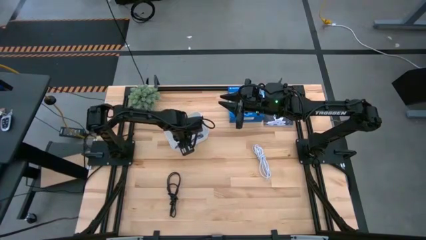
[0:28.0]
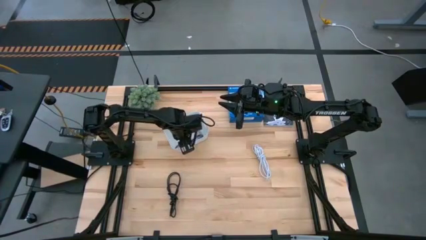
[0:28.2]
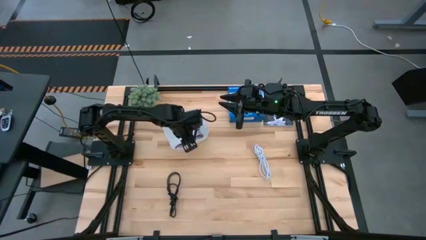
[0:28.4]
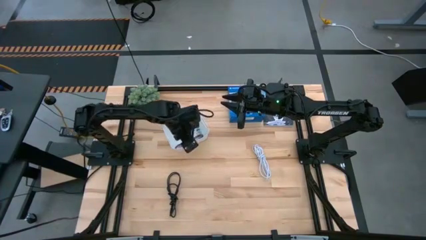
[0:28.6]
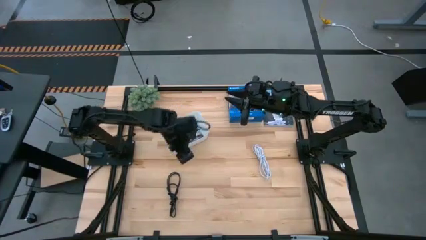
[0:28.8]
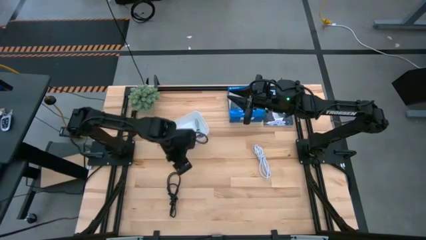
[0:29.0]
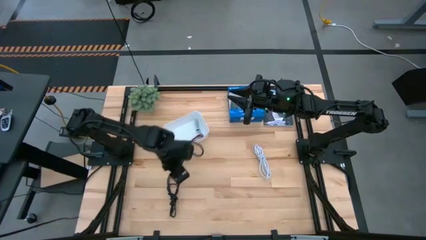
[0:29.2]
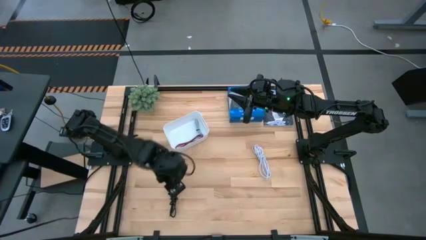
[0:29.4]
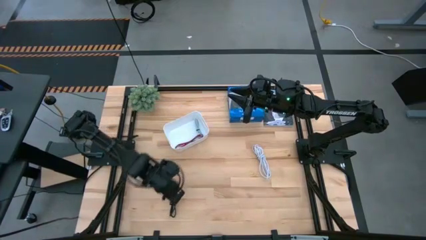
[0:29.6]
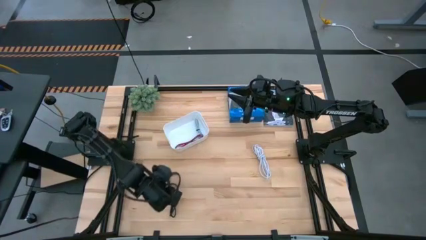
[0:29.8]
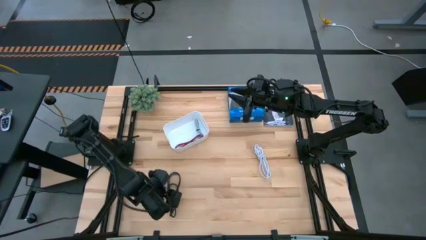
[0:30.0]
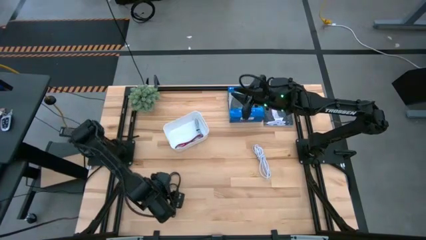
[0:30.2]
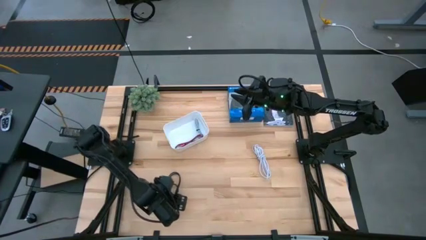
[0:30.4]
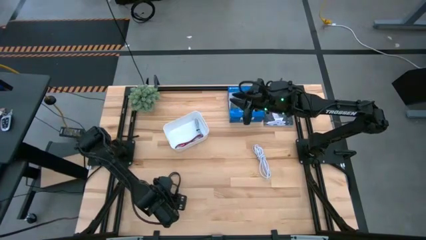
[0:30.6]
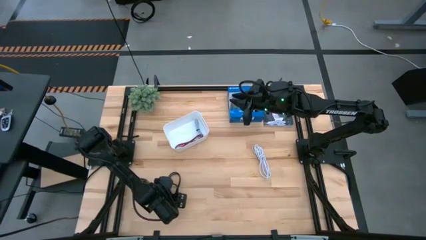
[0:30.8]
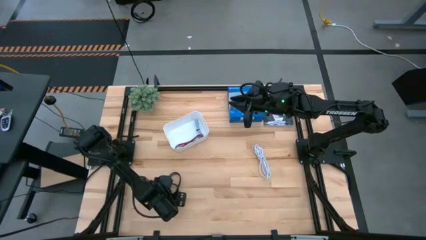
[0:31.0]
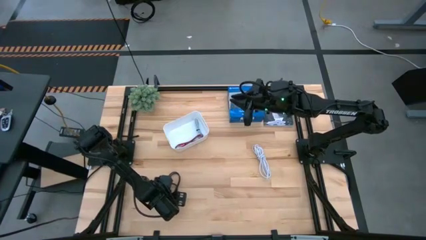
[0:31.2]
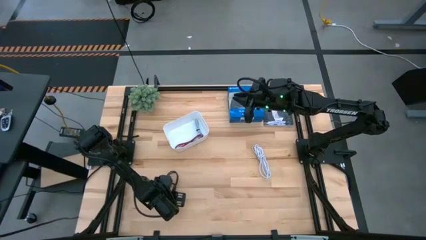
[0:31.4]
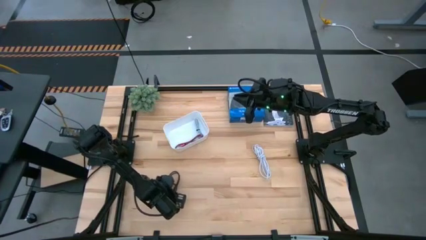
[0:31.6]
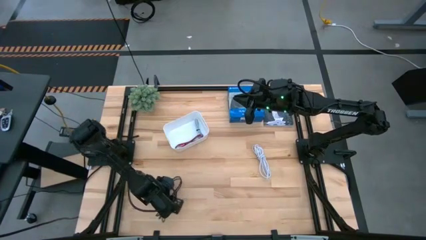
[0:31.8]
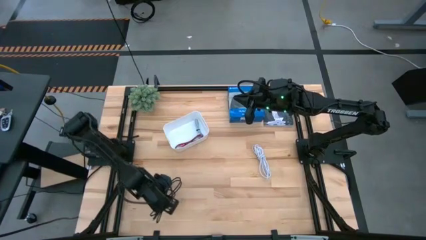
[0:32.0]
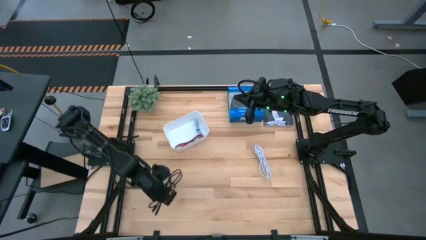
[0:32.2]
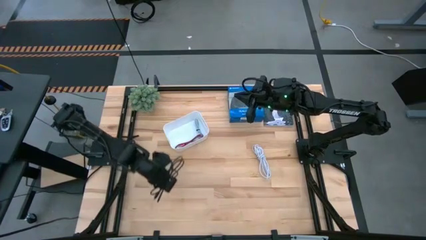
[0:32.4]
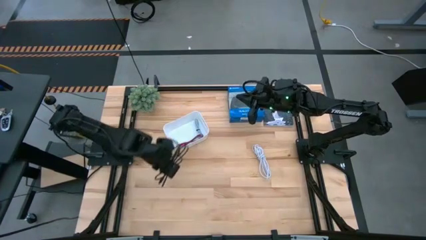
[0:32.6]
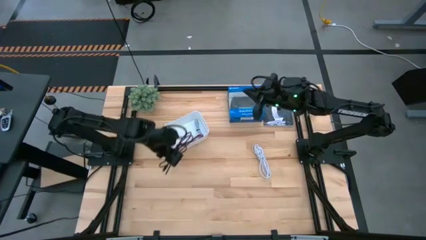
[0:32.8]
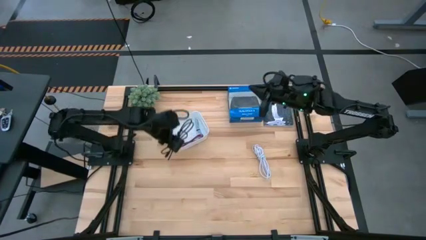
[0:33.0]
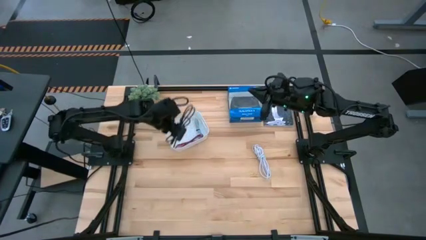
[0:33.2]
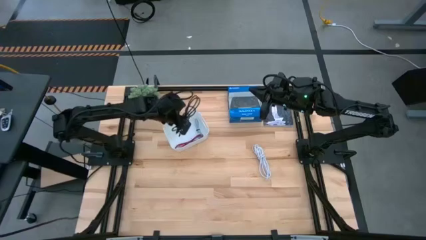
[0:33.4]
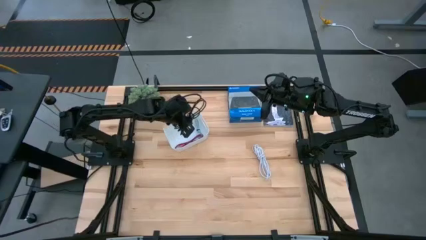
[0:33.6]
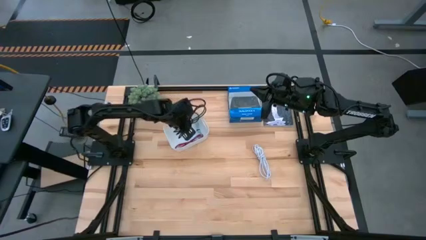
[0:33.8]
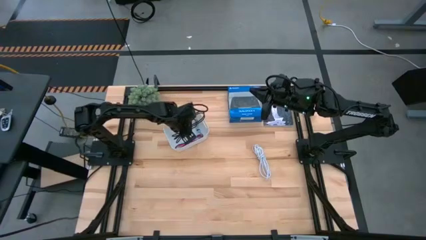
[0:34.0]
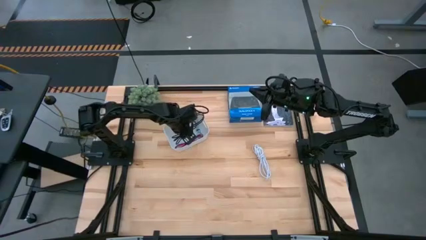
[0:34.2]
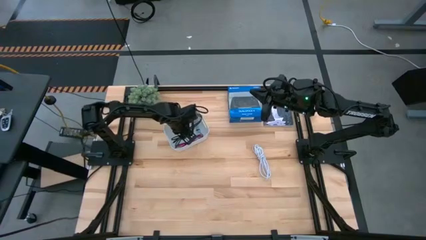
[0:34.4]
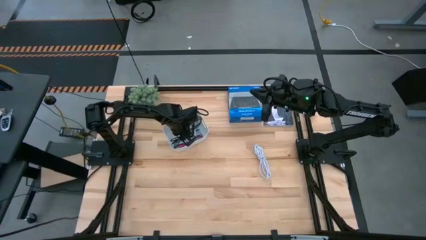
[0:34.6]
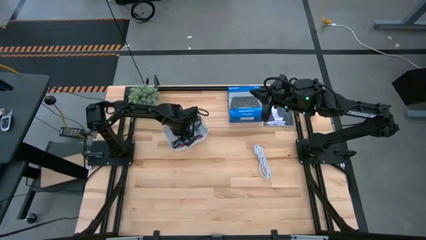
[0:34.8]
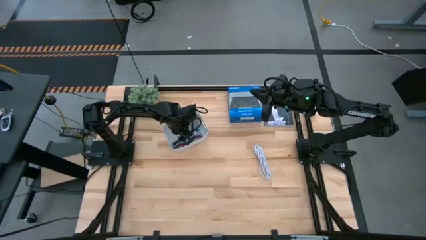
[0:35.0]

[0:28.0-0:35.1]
Task: Pick and place USB-C Cables
Put the black charger cable into the white bin

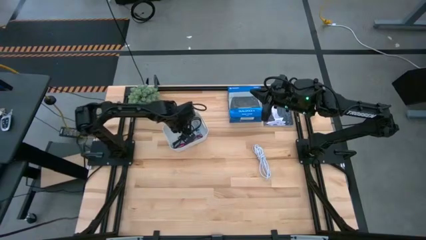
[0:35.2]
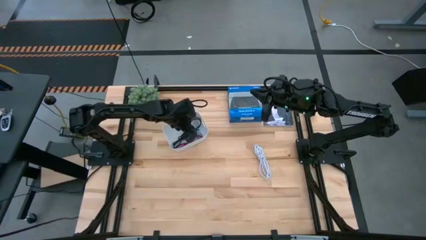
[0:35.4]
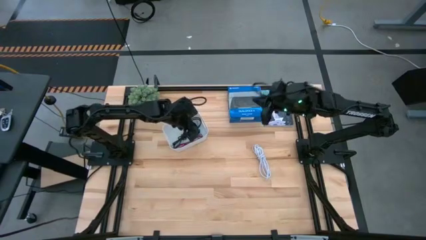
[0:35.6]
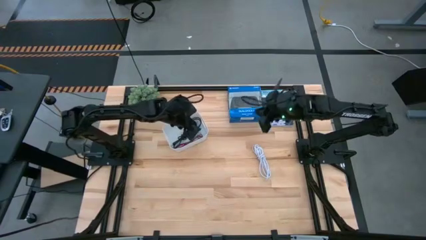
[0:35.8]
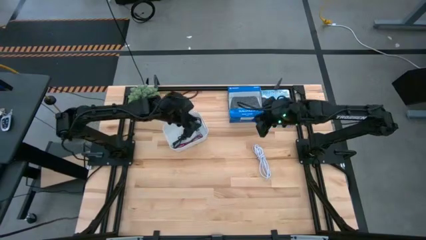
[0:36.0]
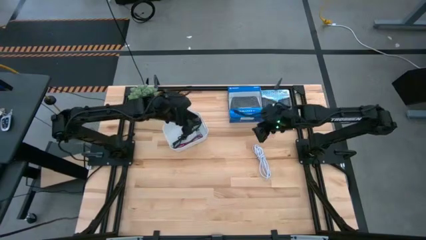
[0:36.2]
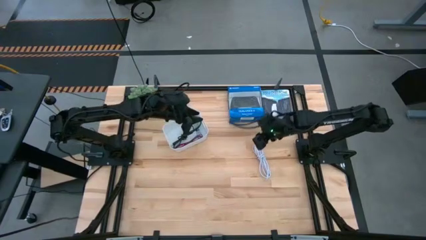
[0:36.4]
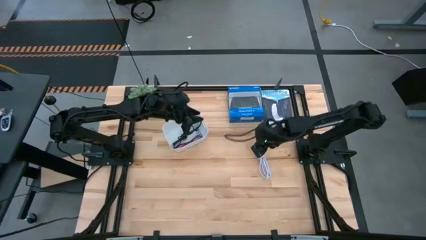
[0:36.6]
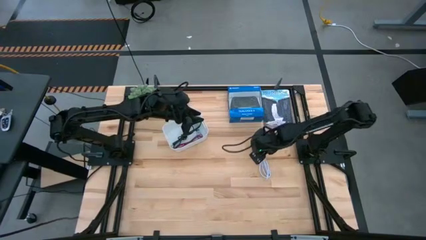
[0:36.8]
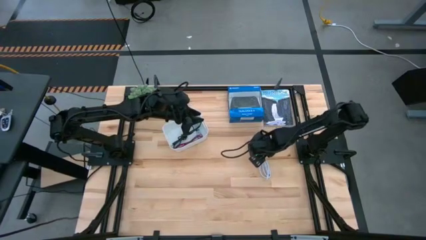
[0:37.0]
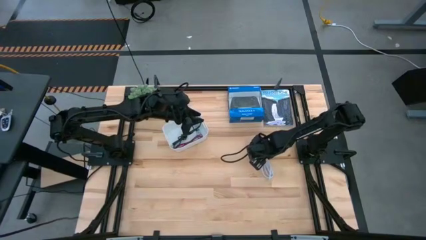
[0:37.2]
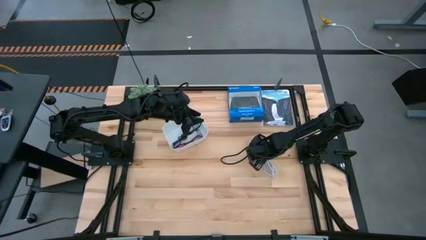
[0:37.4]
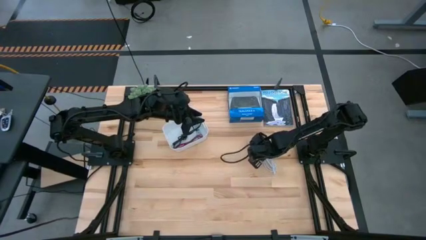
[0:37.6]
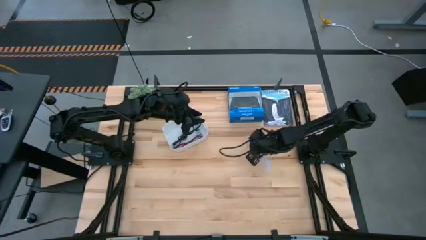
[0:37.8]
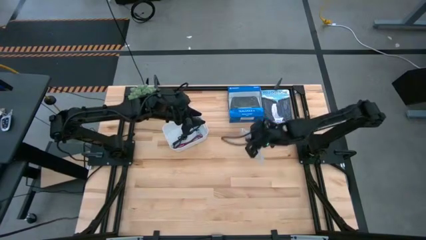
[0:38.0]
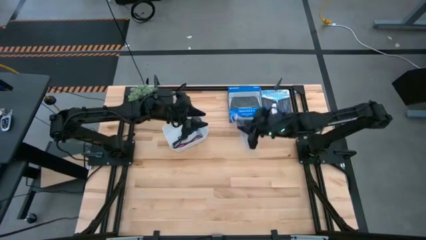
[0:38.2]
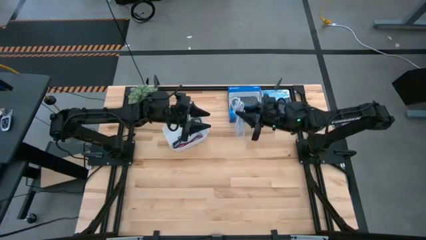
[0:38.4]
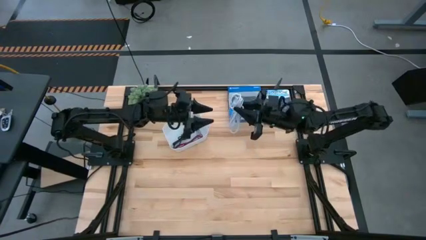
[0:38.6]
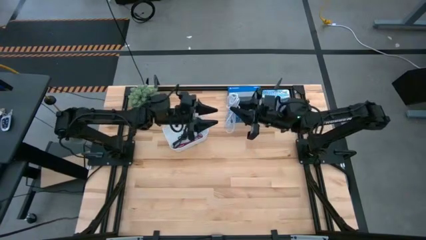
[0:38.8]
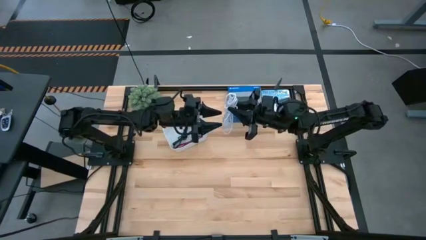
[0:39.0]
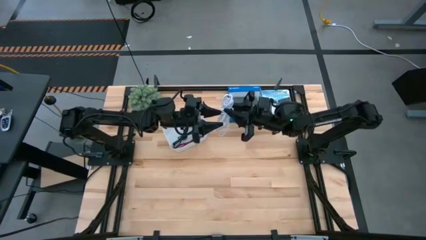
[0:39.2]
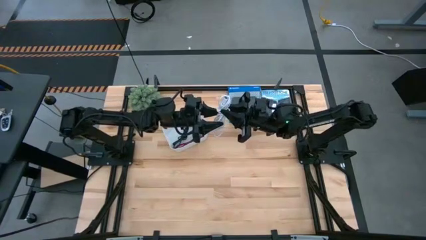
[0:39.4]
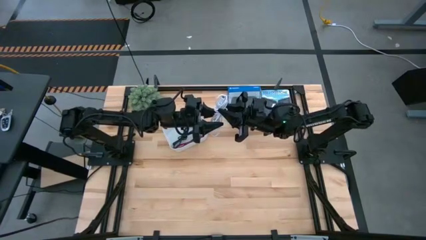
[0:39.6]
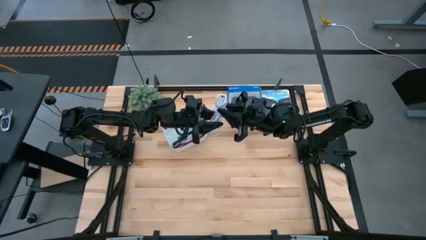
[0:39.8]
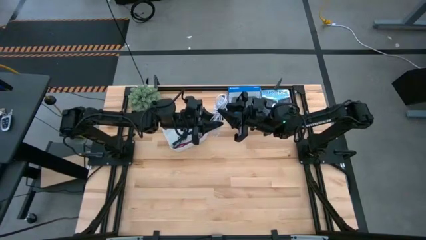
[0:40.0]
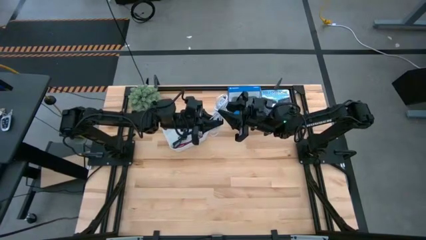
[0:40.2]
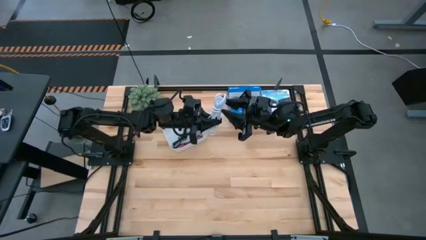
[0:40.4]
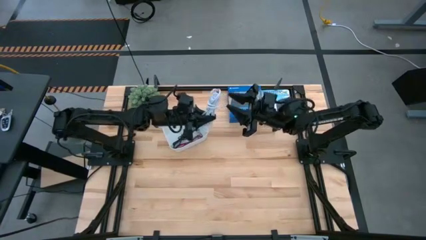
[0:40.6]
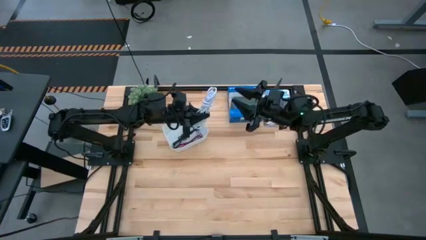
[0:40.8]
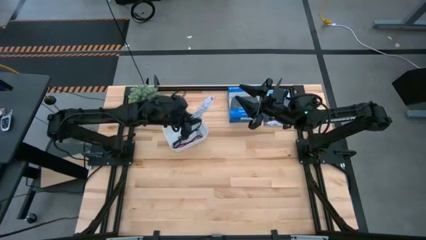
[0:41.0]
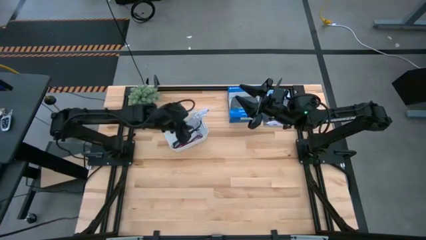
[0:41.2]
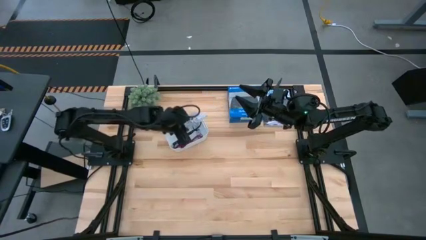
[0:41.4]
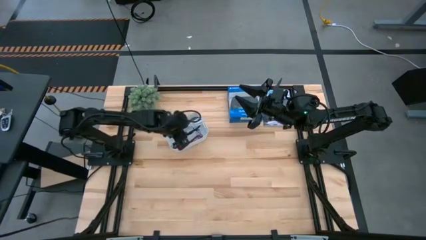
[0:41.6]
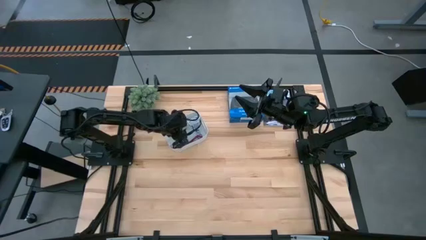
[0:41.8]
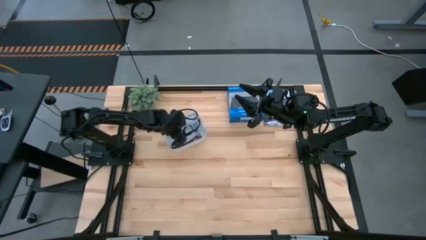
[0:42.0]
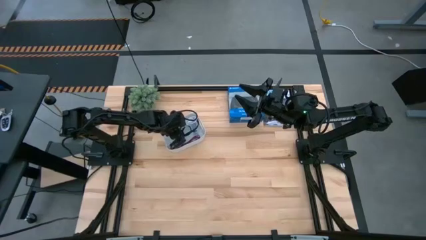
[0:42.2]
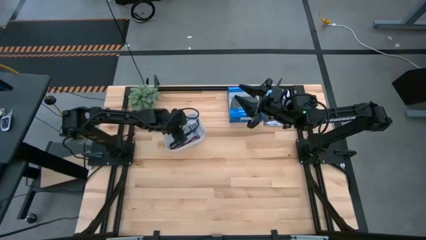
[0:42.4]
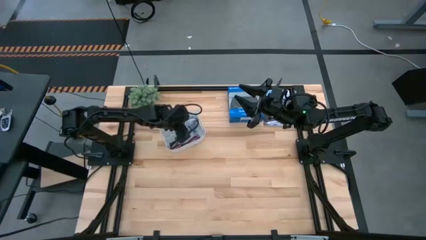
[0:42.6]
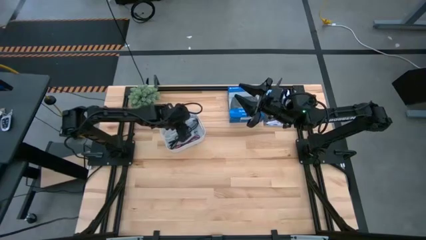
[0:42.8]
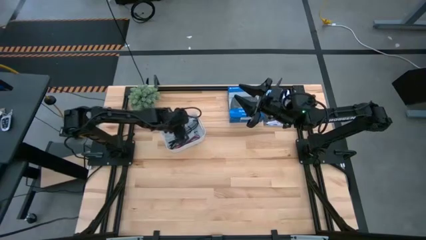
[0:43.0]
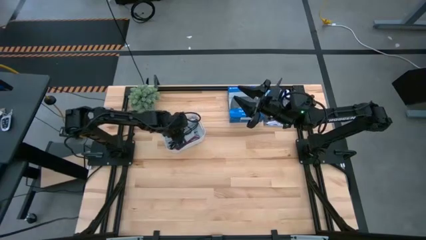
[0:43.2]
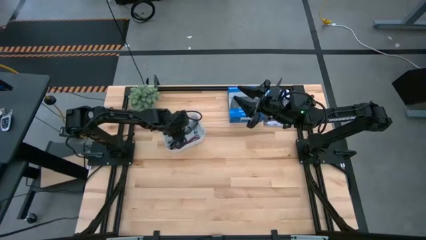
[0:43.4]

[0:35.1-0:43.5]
Put the white charger cable into the white bin
